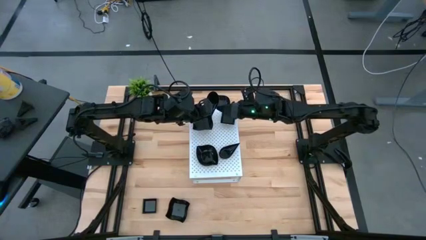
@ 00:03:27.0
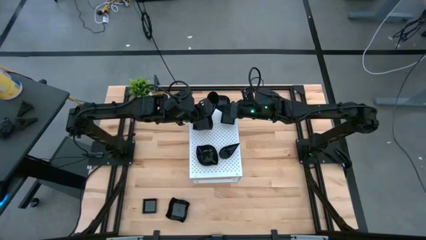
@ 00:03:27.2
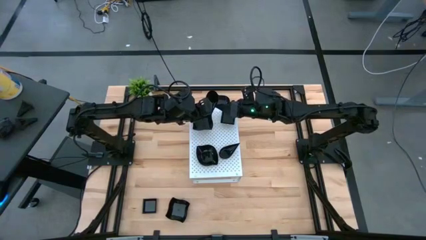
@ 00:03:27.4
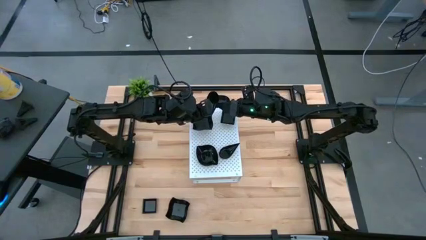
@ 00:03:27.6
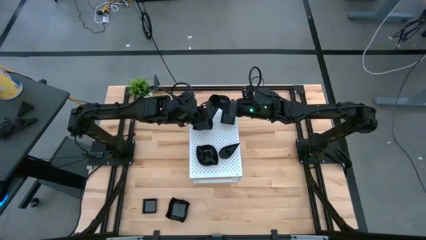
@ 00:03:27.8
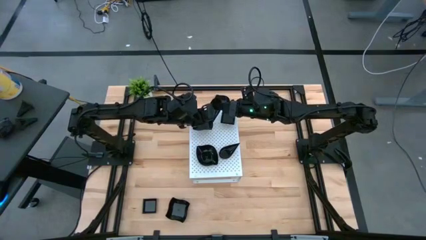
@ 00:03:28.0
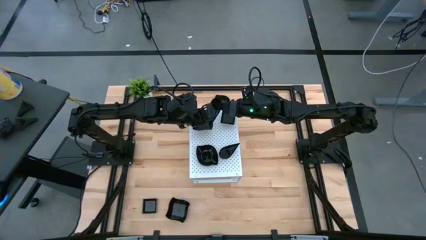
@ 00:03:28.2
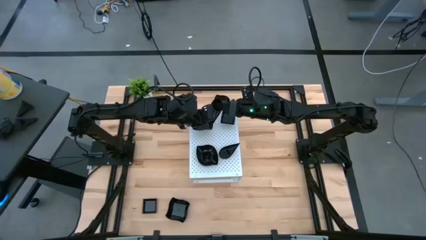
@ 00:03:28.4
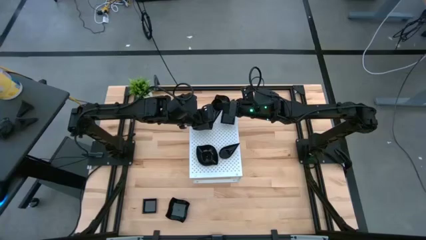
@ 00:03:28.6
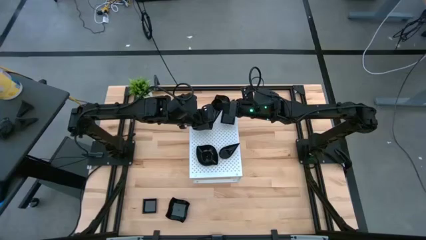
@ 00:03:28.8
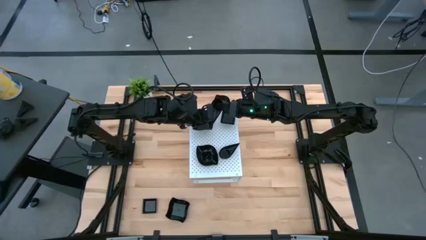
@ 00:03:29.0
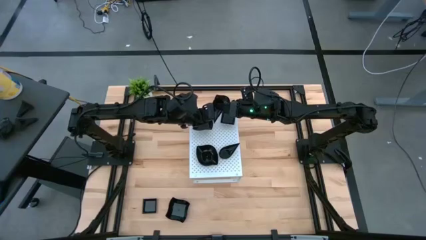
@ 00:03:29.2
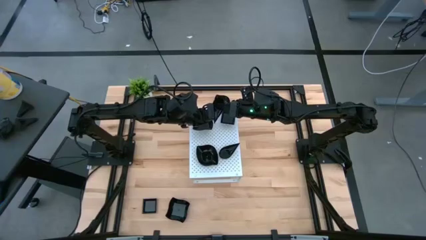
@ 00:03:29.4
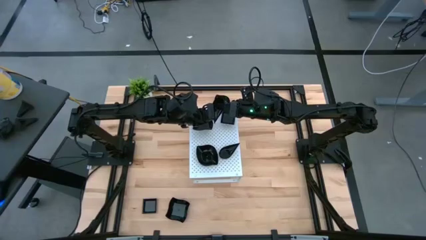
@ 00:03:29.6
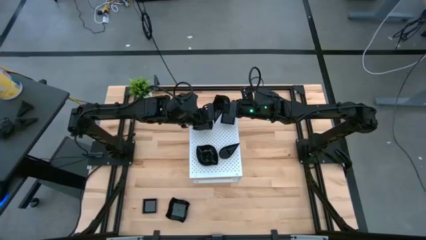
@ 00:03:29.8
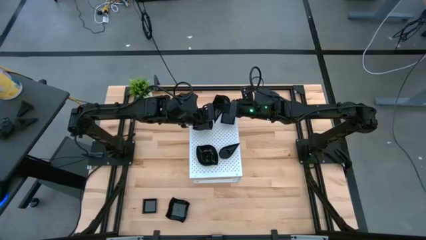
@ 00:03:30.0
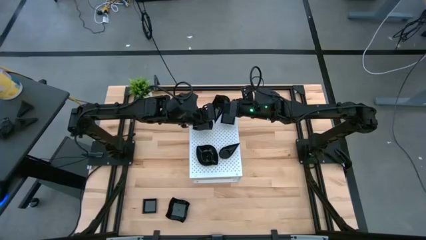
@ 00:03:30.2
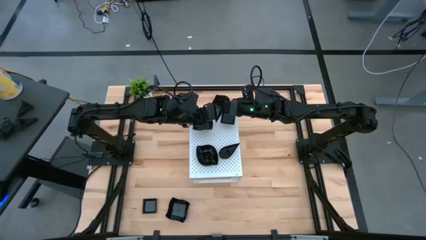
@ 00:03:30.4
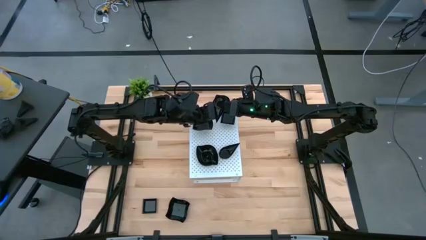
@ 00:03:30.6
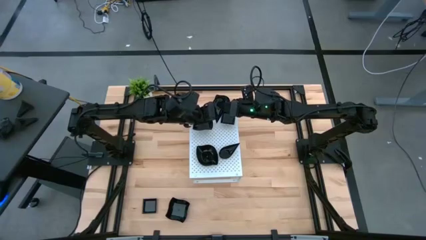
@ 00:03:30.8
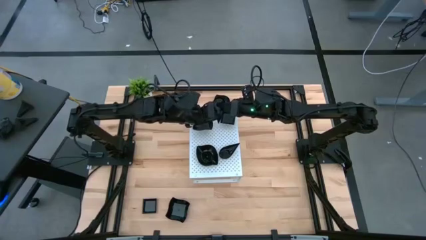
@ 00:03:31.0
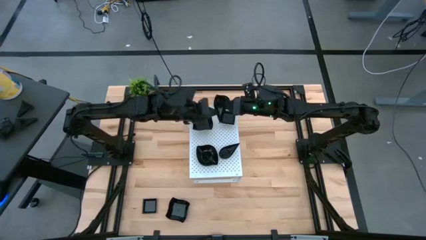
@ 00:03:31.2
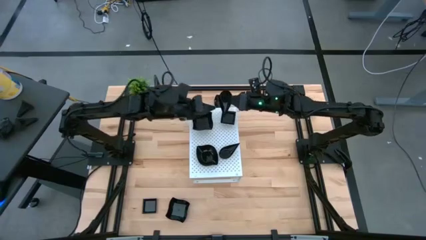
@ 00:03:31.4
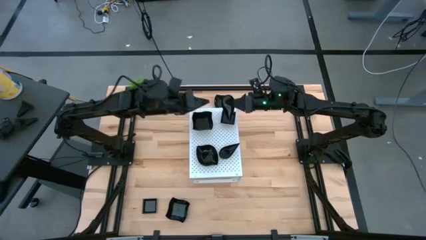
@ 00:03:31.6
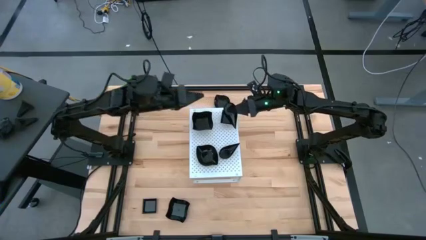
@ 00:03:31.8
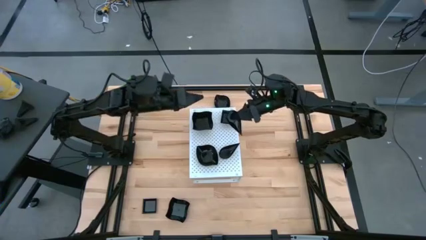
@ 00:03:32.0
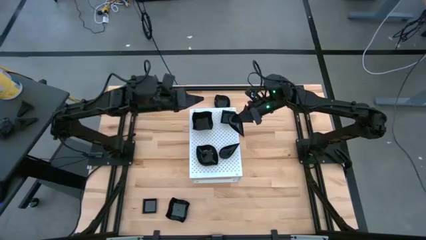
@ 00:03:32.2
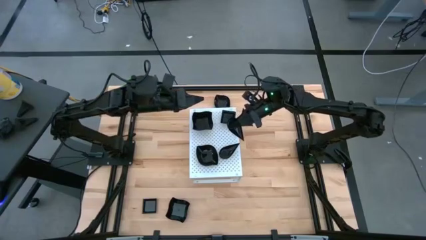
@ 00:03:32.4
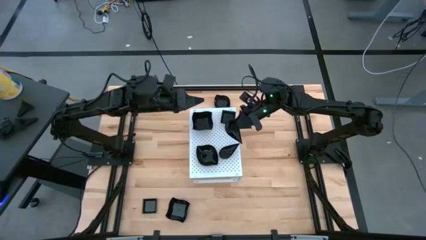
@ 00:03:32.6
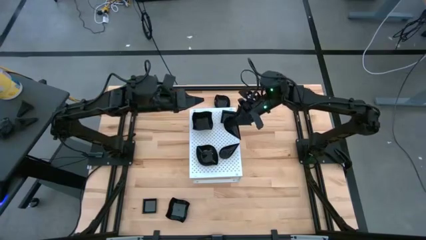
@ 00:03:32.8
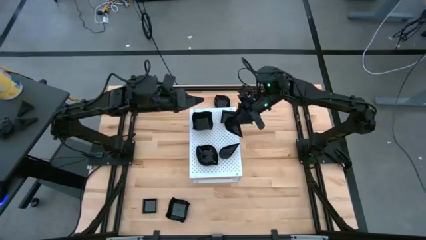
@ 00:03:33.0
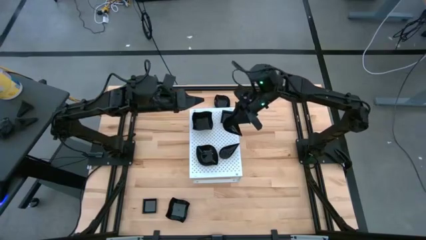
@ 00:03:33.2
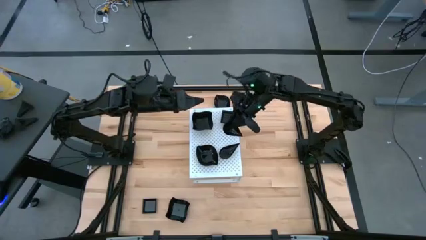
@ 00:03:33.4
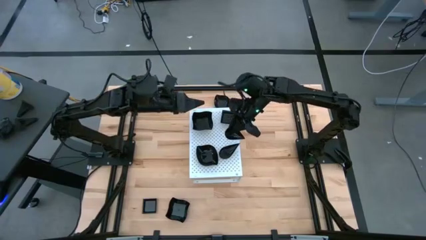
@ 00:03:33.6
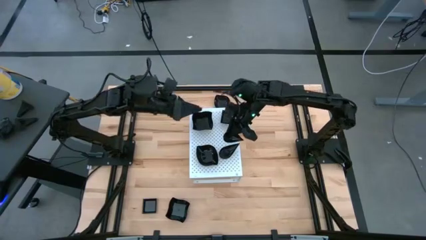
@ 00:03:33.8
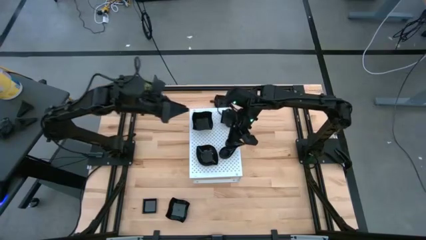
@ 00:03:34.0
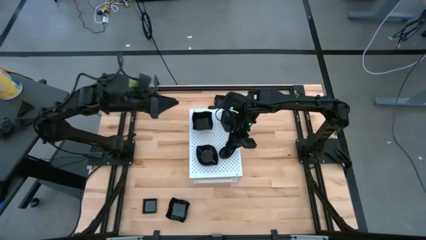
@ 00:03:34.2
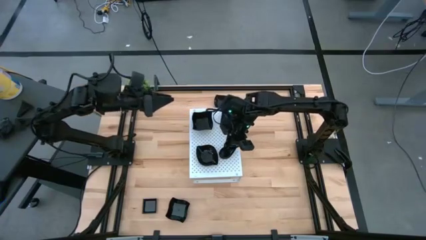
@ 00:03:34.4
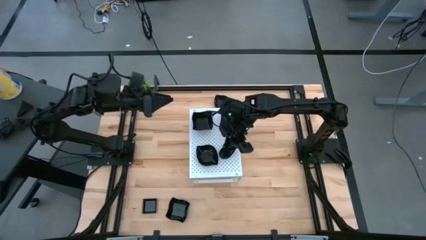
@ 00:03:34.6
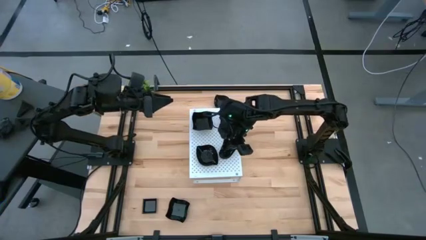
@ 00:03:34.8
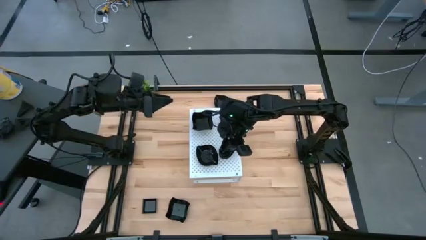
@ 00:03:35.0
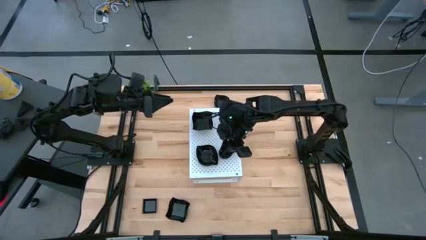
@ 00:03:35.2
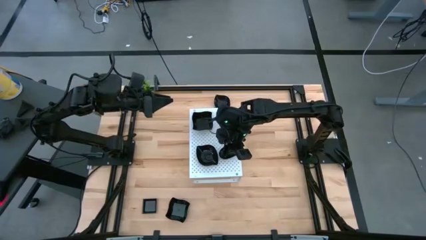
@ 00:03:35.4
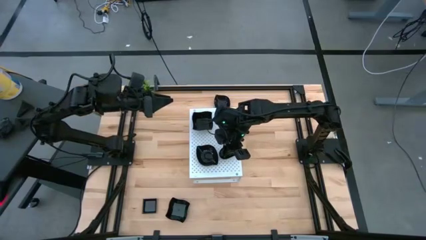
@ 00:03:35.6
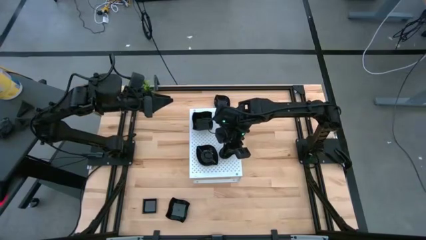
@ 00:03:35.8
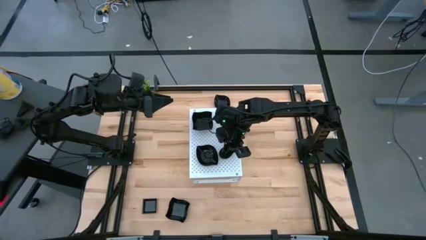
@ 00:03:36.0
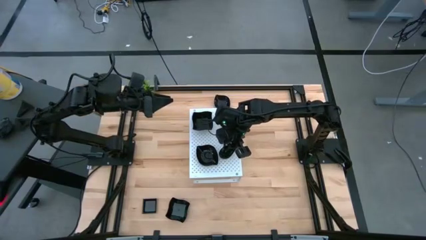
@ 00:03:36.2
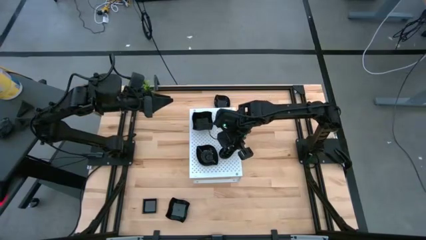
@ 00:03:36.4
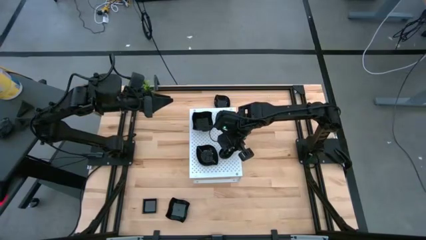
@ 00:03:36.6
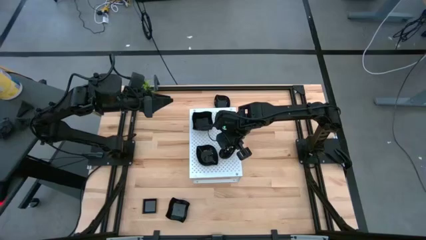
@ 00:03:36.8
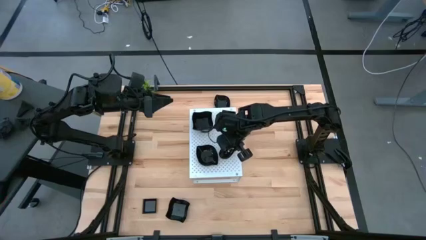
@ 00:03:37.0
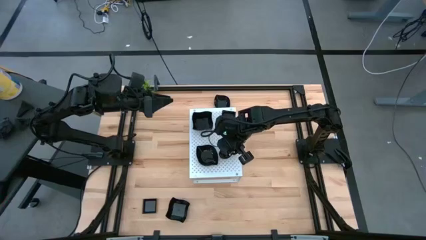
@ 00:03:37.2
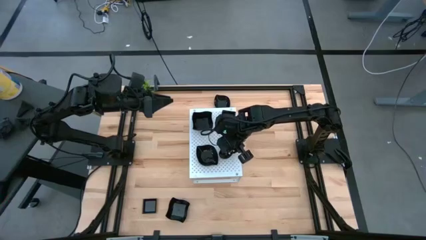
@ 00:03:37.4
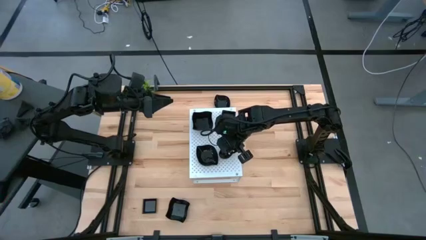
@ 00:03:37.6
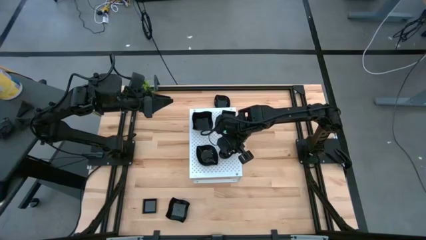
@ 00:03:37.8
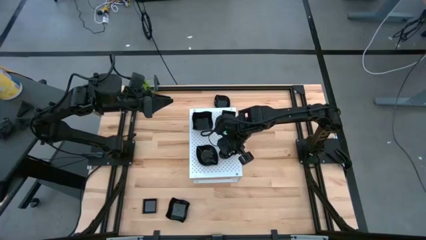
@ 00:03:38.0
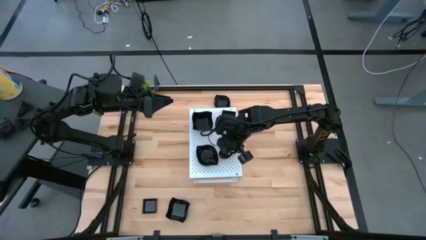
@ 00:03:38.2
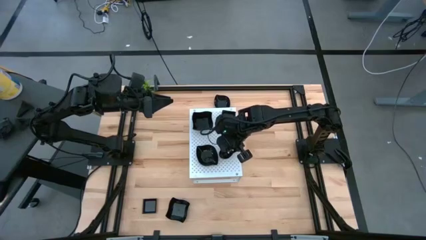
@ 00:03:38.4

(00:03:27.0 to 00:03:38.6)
Task: Pick & Place Mini shaped plates
Stack the black drop shaped plate on top of the other black drop shaped plate on the shelf
